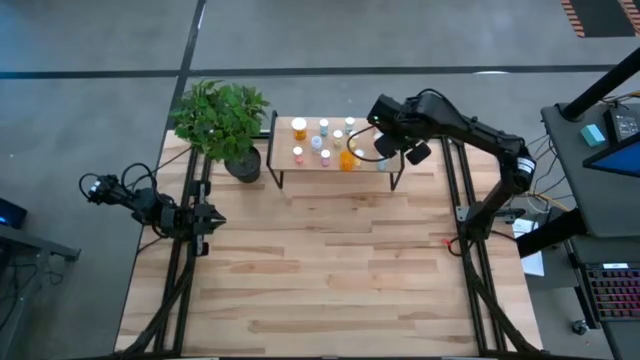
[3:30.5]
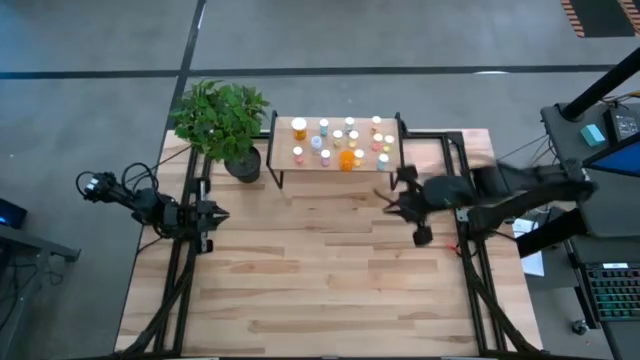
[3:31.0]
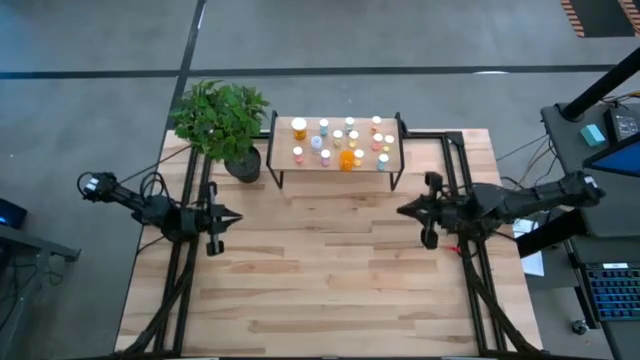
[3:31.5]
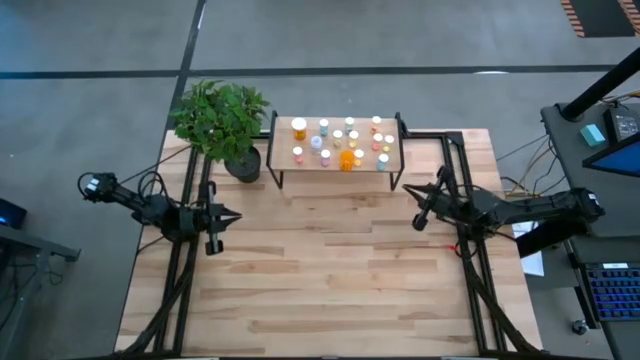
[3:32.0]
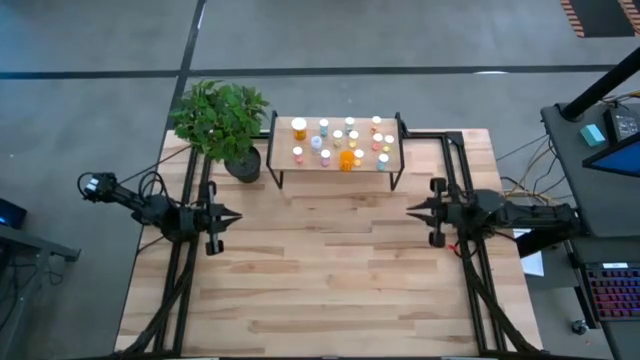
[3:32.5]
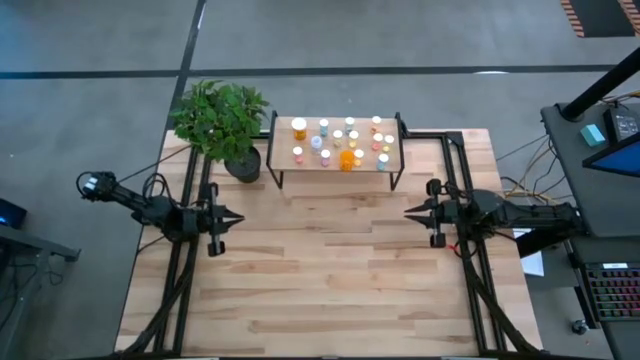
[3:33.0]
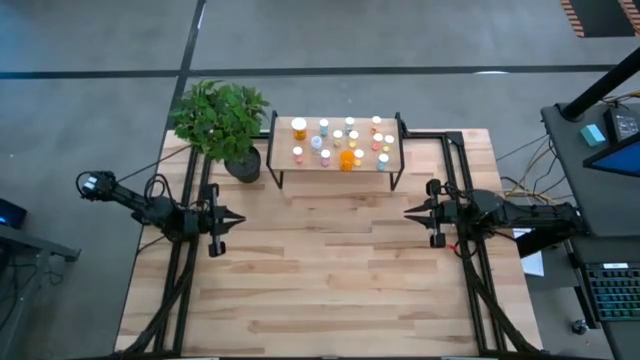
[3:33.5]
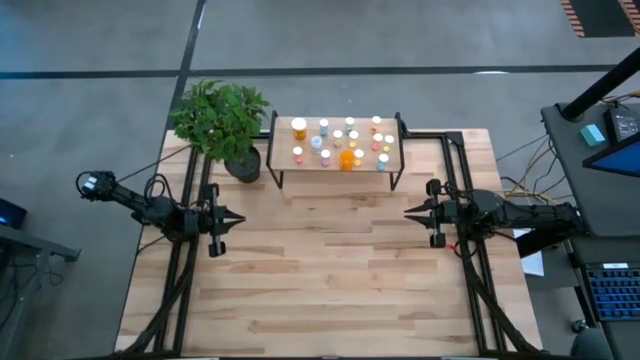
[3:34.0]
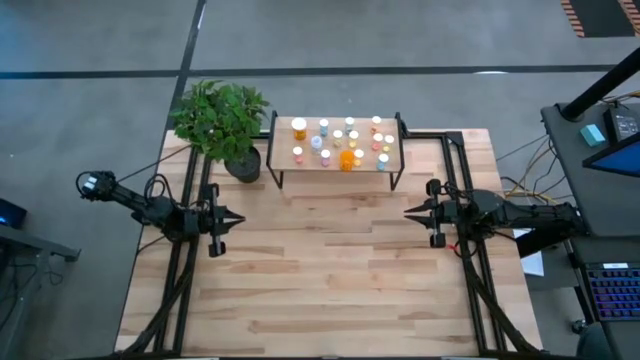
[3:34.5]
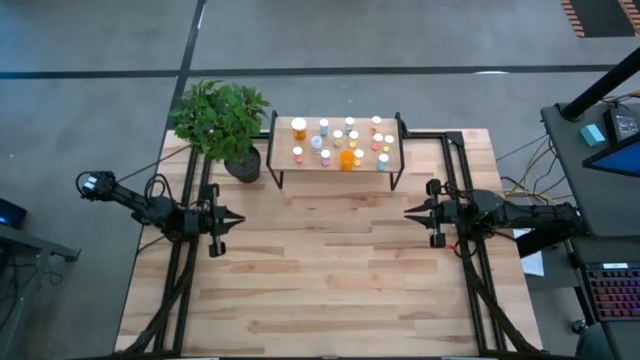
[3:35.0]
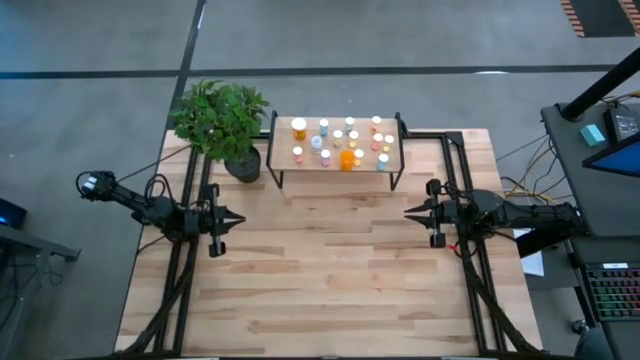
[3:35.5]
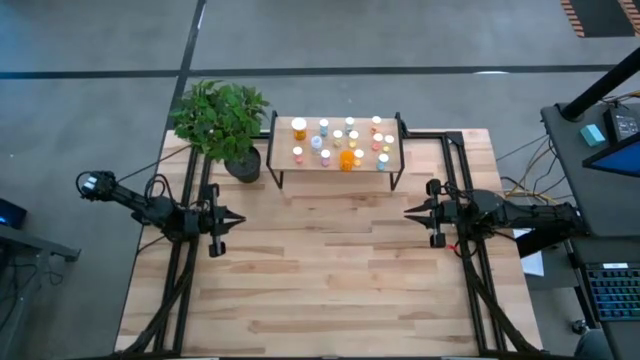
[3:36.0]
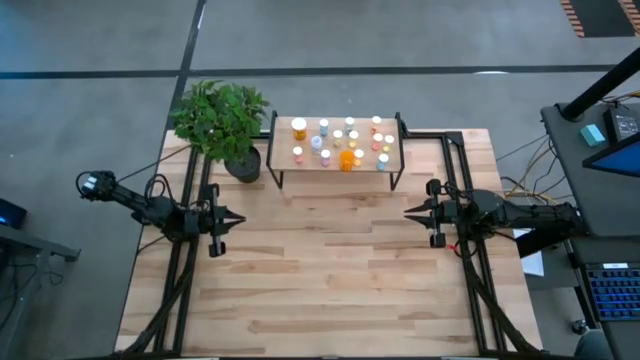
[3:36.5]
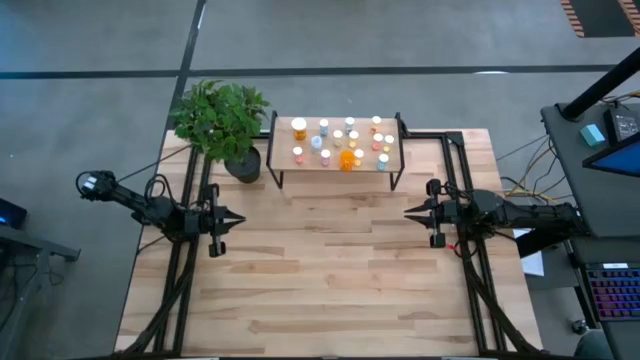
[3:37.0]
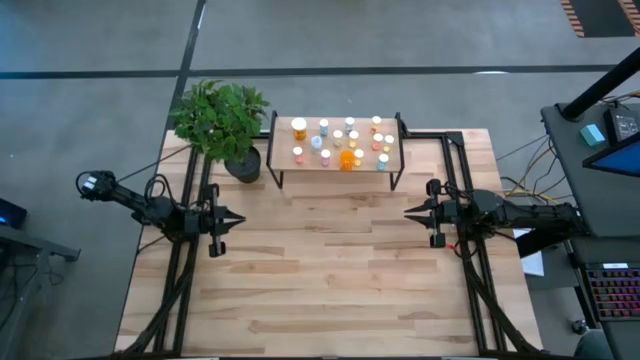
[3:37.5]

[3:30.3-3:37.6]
Task: Pick and place medicine bottles onto shelf by color
Return to Home Position

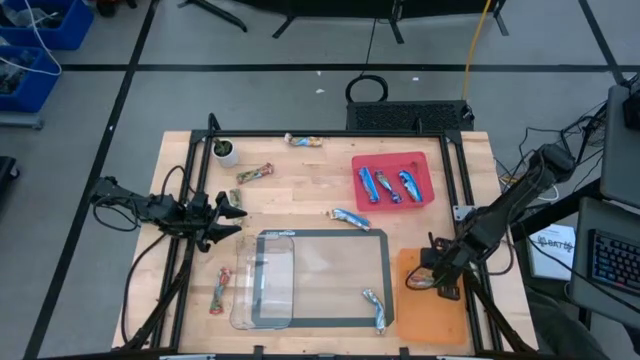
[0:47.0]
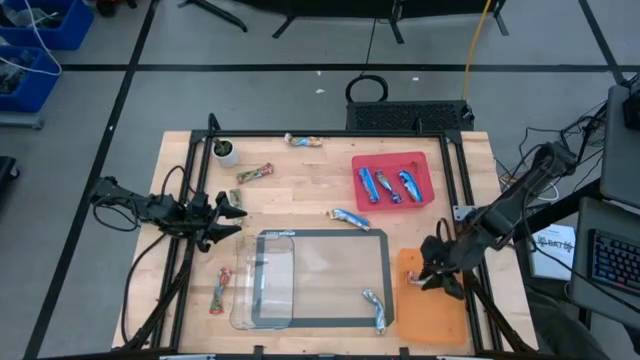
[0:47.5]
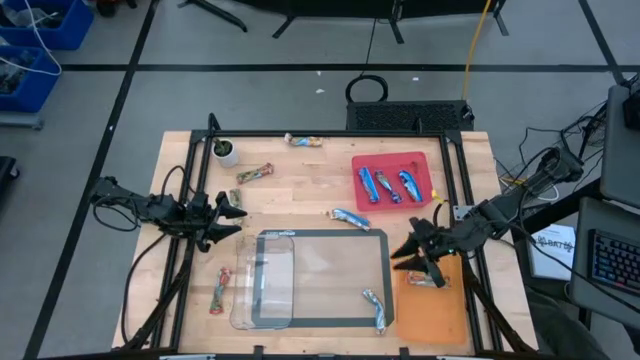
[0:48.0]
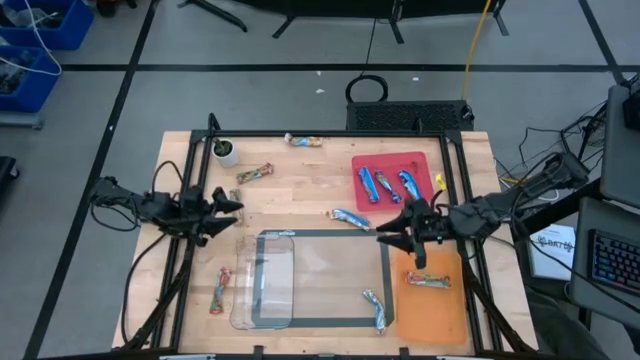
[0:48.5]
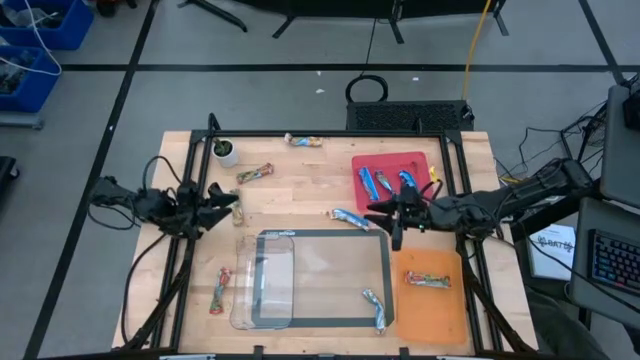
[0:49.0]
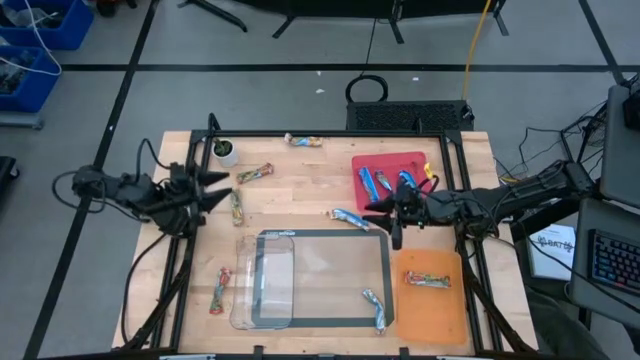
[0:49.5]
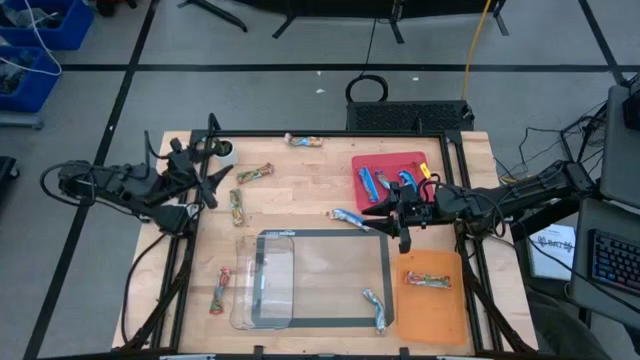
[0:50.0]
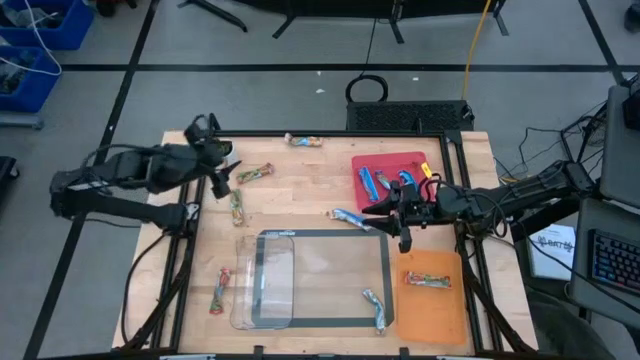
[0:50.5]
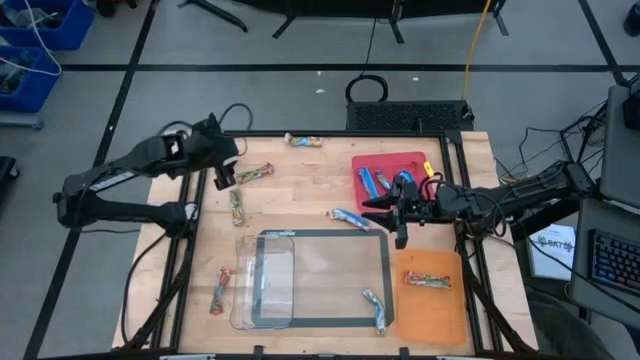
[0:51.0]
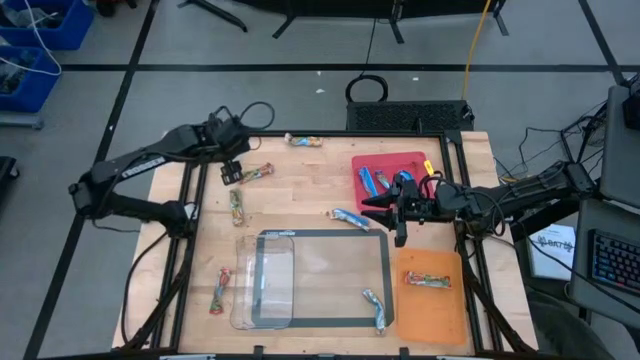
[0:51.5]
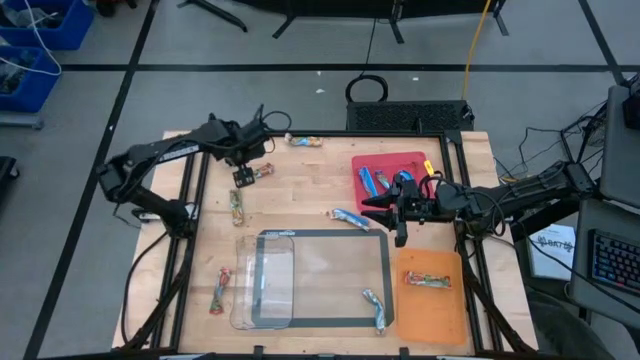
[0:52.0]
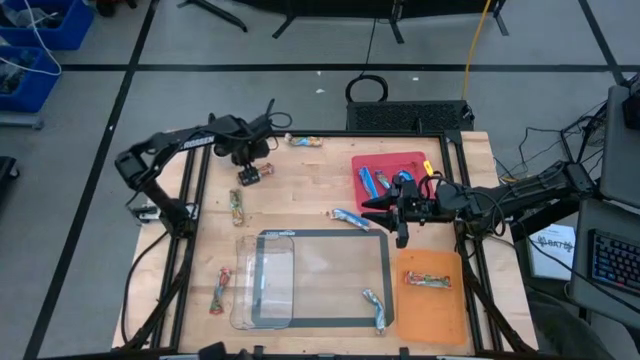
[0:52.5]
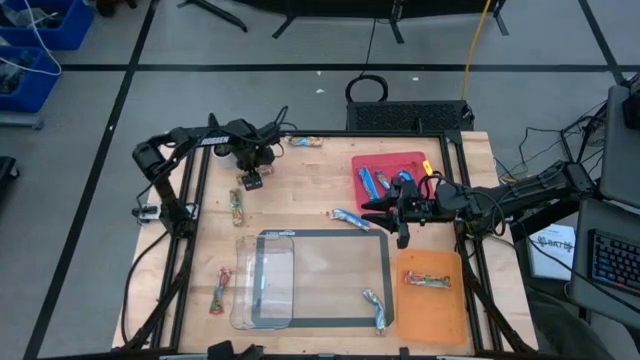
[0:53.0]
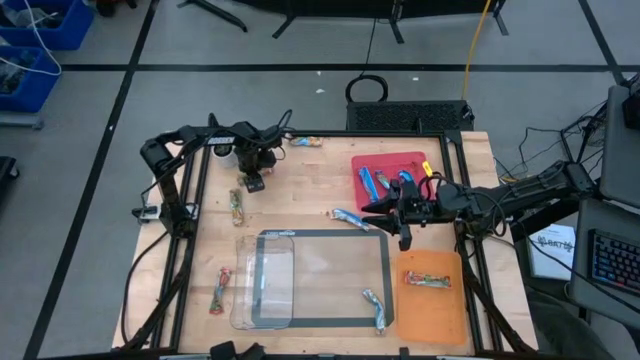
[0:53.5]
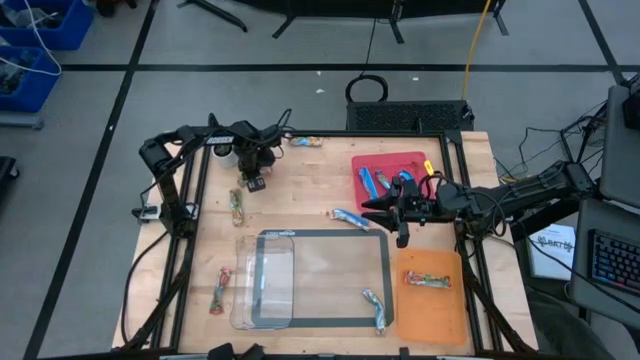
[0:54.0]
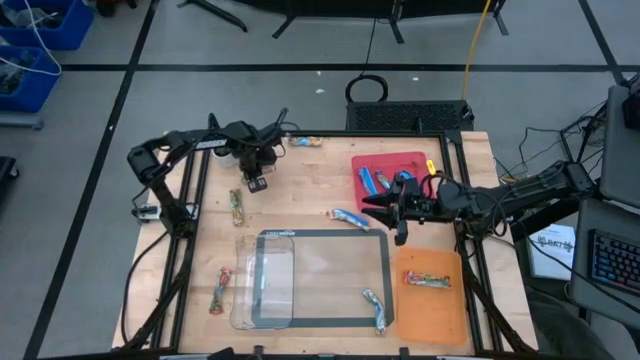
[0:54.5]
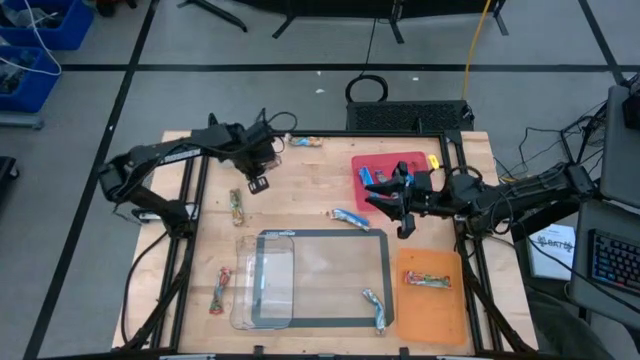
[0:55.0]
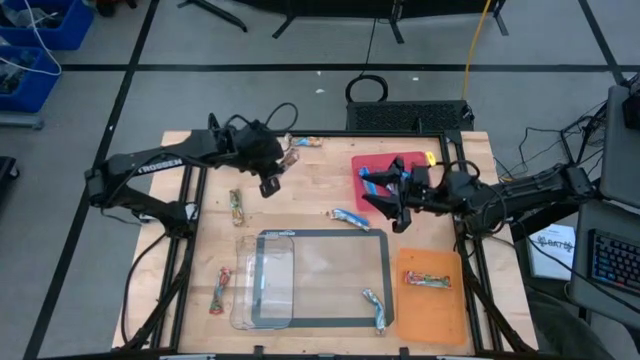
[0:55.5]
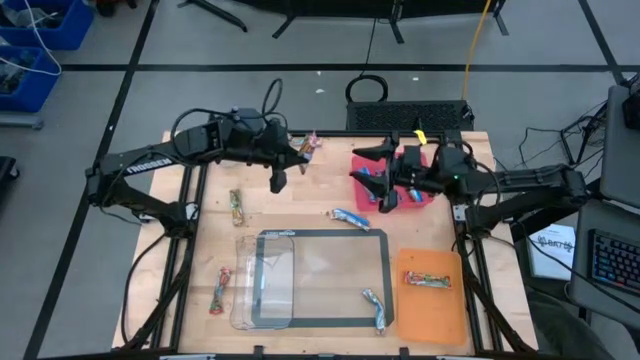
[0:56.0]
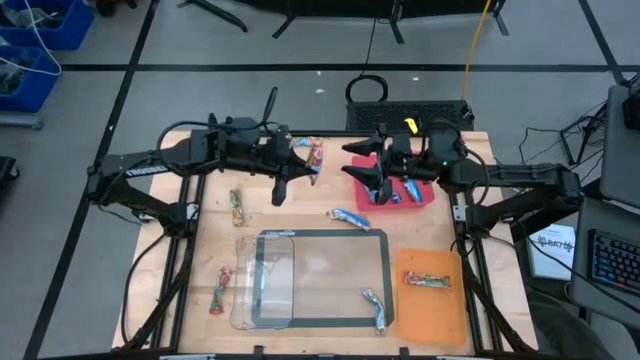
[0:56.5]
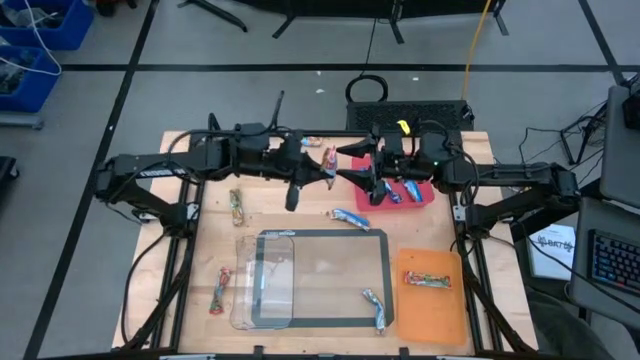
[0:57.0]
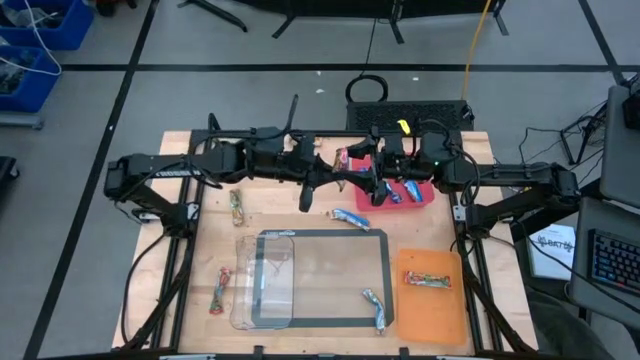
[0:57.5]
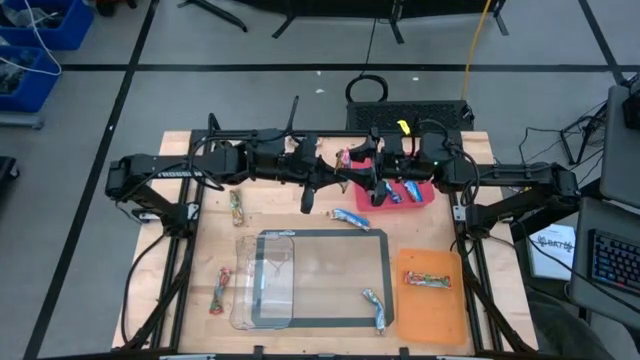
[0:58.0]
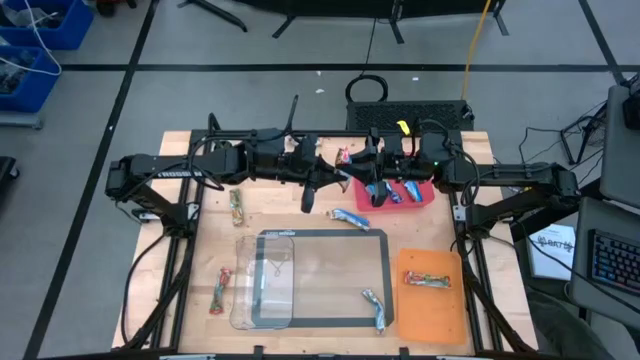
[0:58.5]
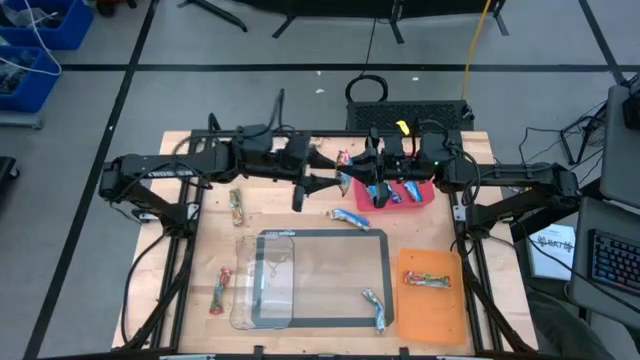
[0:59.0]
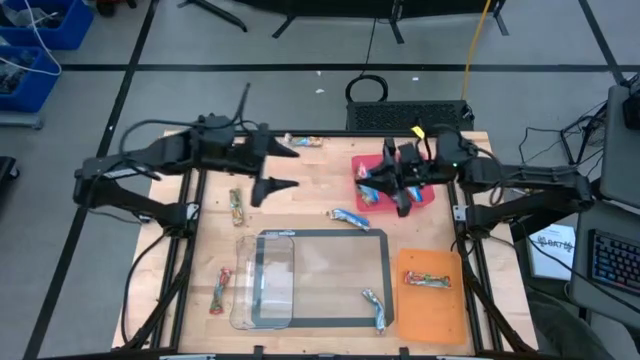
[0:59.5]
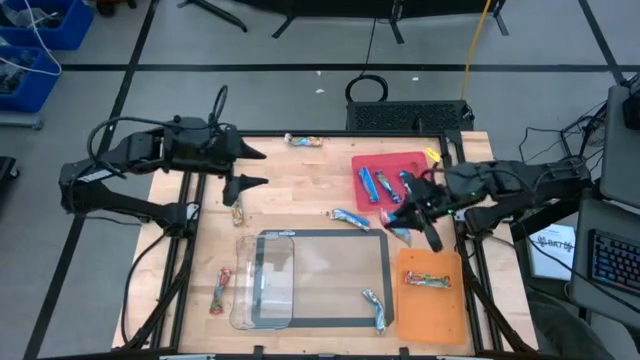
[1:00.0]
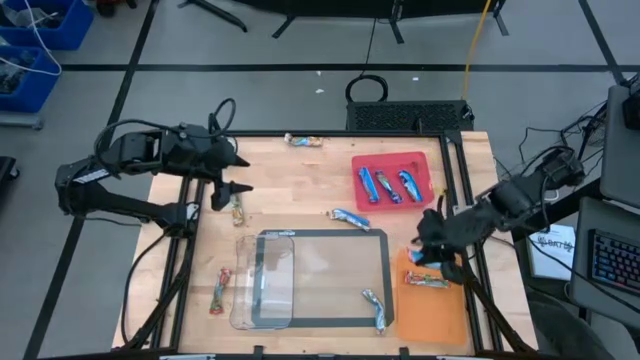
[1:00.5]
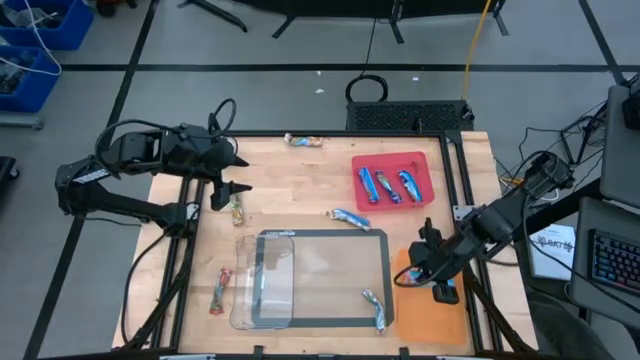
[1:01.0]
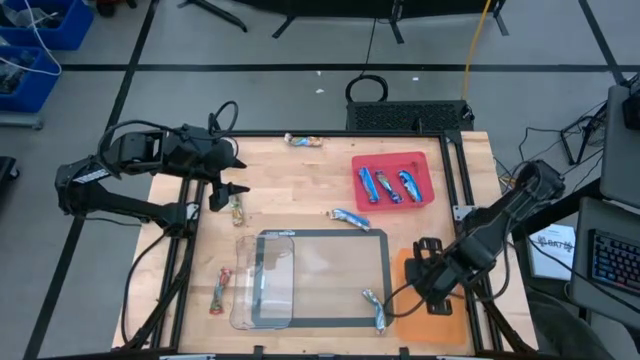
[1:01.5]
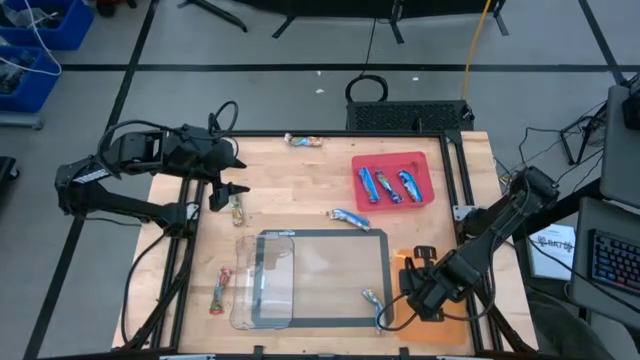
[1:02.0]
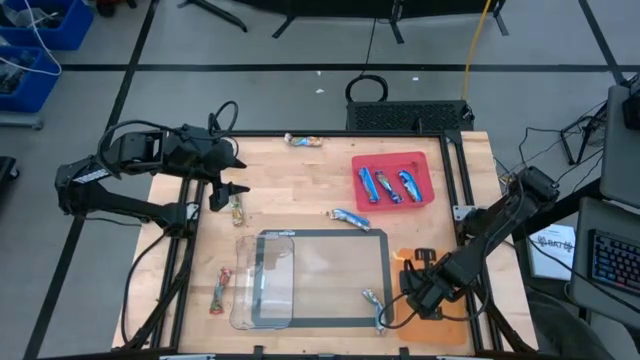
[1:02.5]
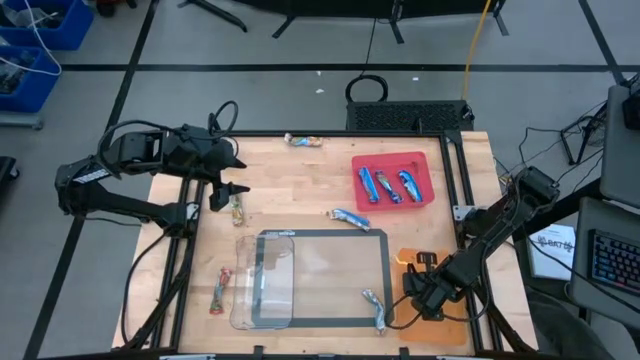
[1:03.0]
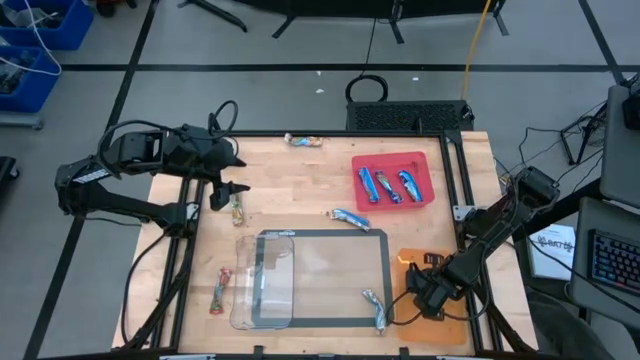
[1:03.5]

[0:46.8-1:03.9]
Task: Pick and place Granola Bars by type
Put the top red granola bar into the orange bin
